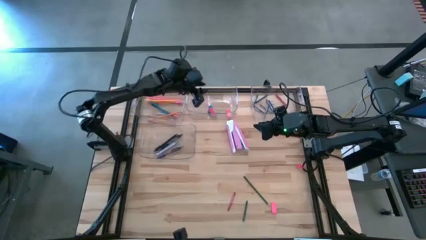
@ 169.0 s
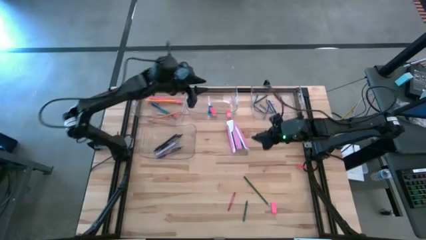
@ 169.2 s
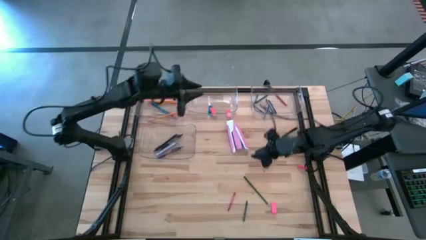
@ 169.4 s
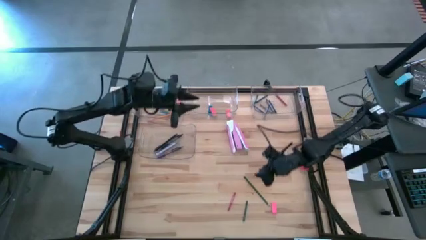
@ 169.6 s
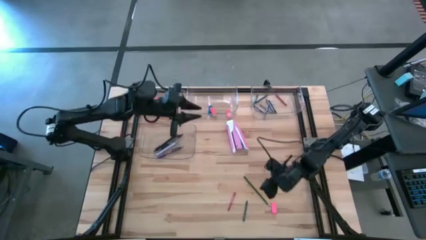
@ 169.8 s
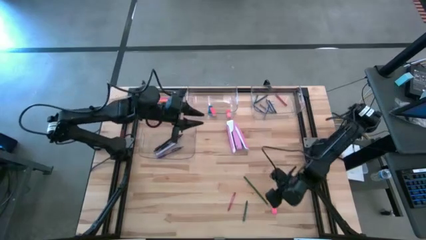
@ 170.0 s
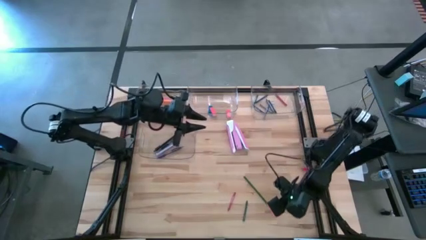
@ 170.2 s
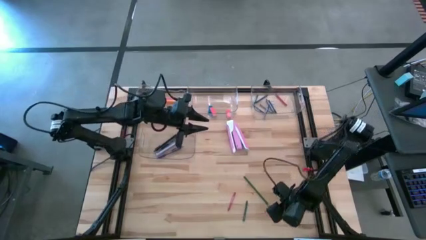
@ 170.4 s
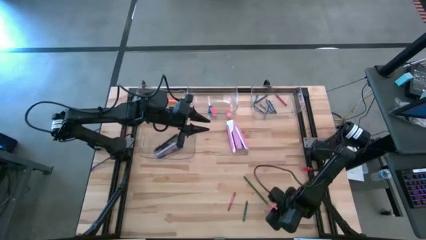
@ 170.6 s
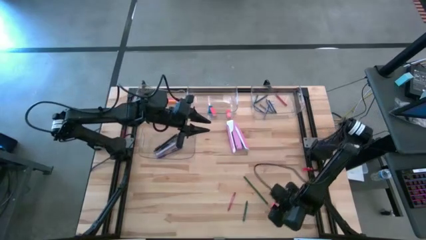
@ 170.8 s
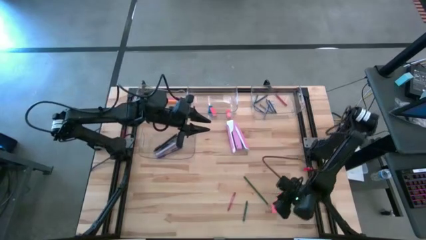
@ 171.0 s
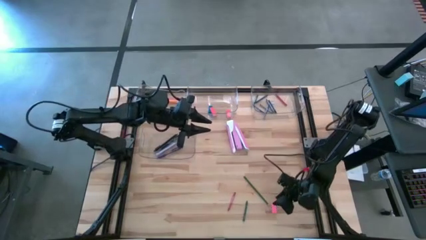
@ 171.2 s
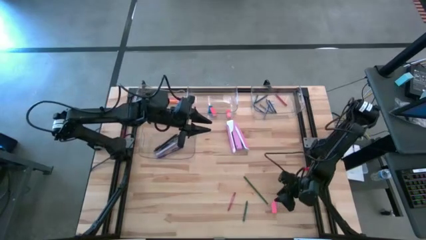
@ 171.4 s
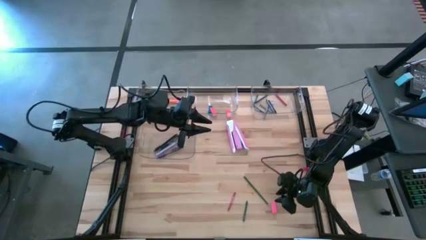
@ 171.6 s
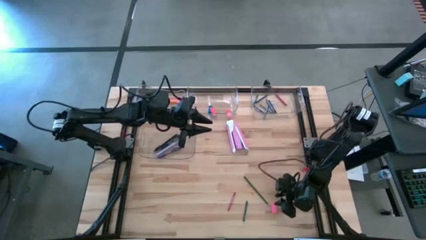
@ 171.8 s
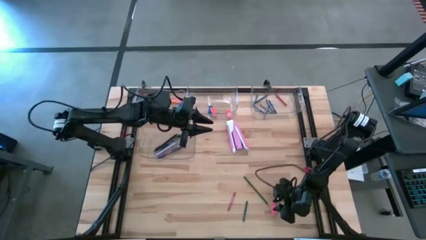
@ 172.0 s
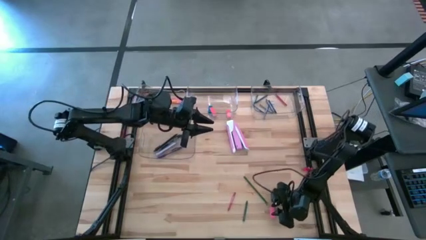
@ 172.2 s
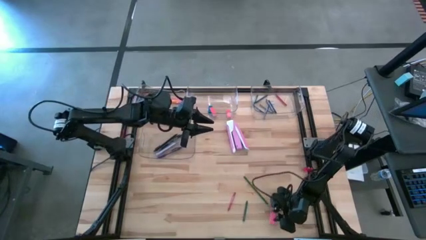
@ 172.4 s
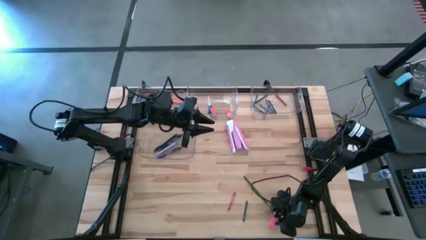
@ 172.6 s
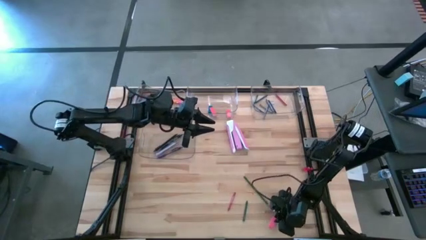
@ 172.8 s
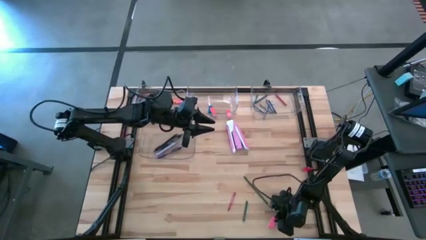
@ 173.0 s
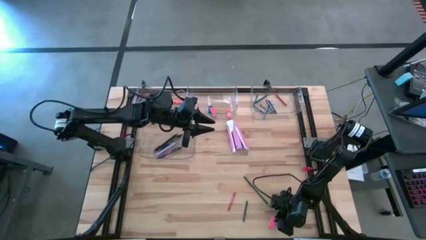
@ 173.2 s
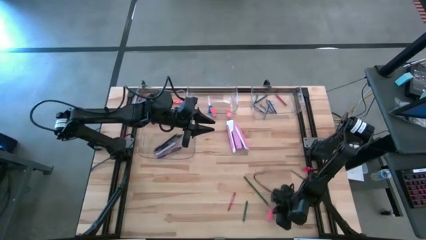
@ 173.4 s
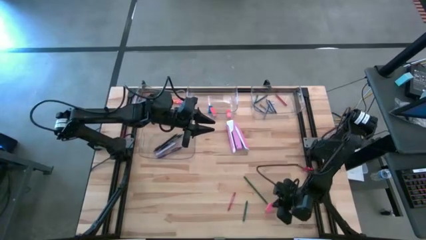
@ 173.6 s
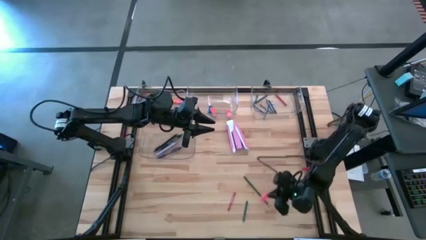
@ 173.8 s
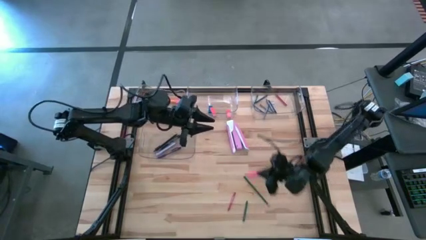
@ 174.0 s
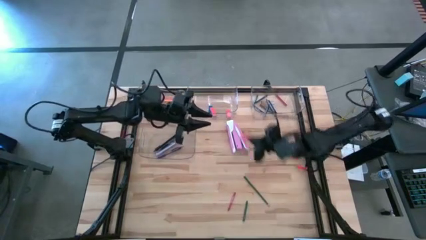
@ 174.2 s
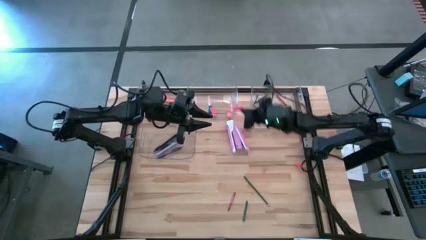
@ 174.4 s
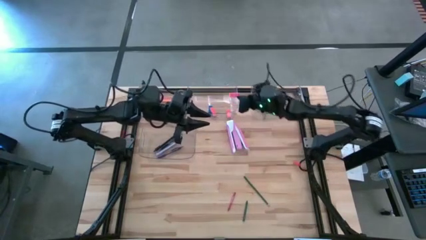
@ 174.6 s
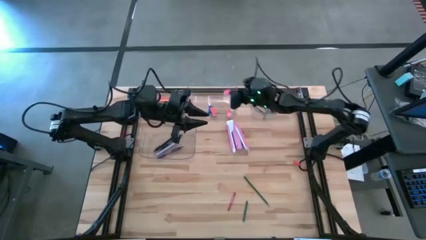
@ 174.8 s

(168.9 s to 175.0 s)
Task: Sort crayons/erasers/pens/pencils in bins
Put the pink eraser into the middle transparent bin

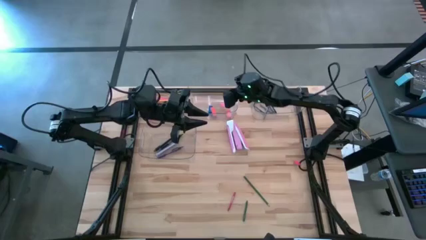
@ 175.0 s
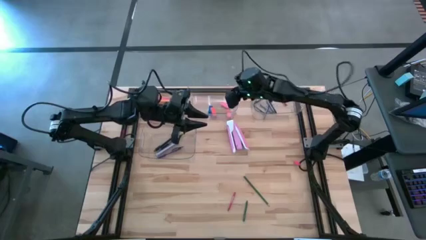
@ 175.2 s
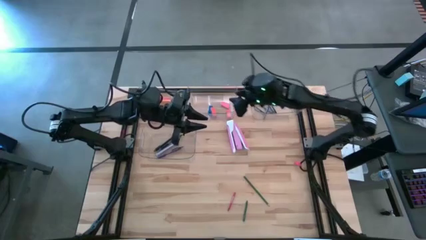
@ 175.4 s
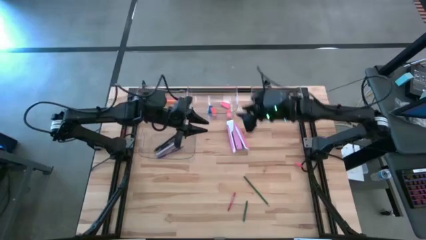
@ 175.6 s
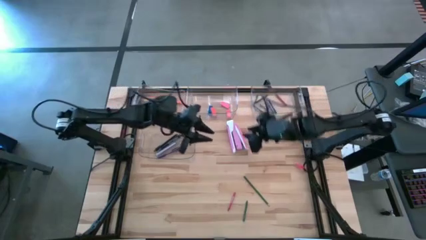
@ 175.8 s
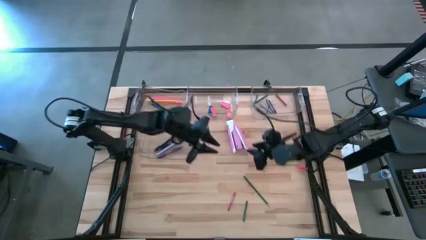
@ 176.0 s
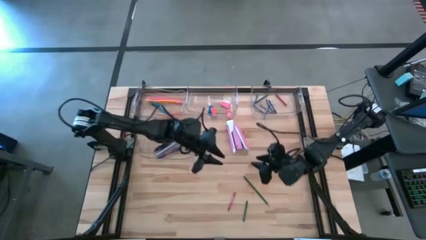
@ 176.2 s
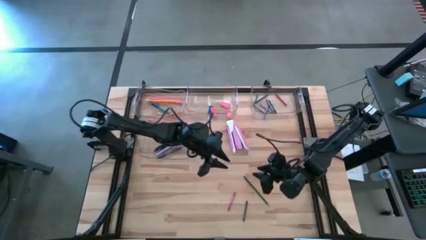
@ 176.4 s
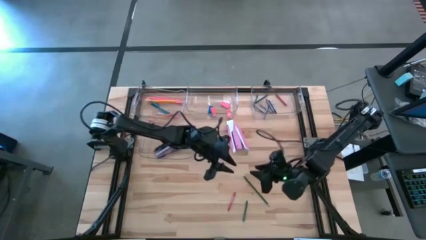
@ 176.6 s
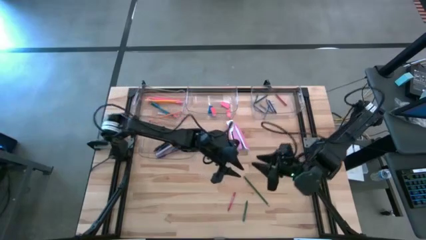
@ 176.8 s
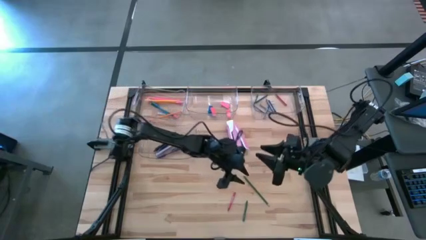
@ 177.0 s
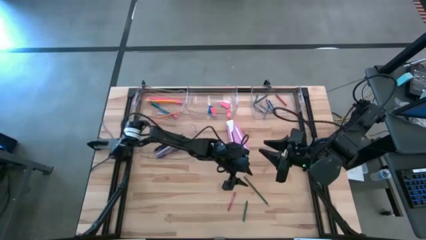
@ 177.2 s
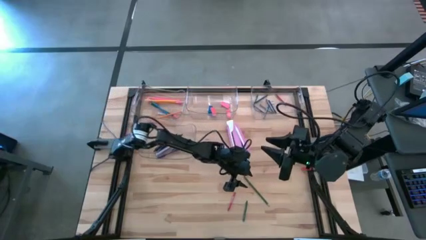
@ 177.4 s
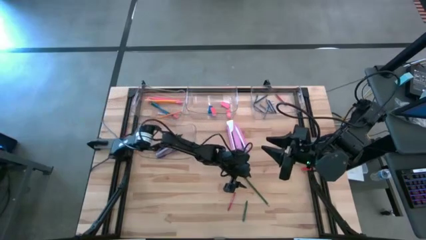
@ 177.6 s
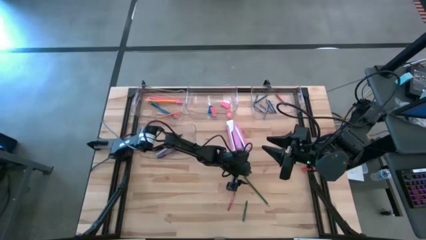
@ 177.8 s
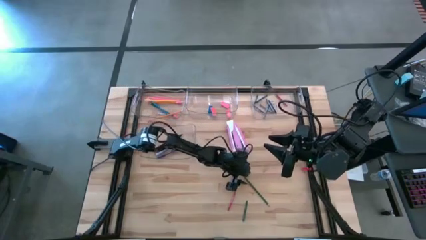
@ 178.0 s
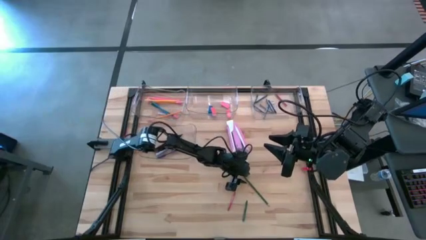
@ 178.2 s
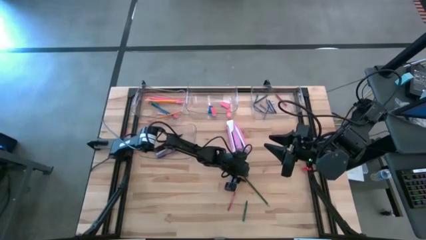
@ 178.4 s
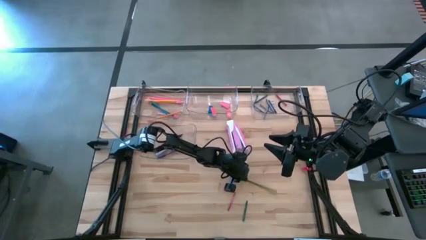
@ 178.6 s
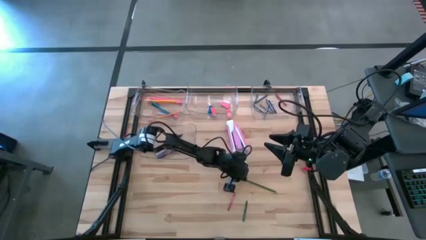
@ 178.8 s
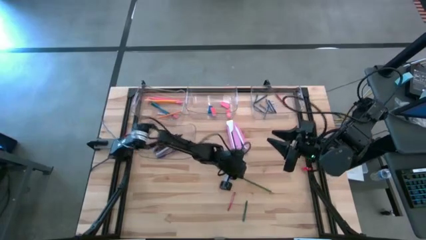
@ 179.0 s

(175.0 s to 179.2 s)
Put the green pencil into the top left transparent bin

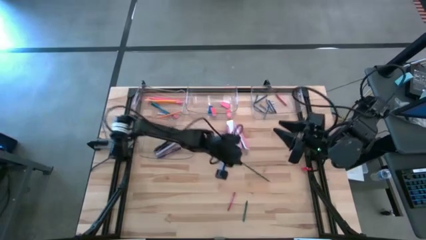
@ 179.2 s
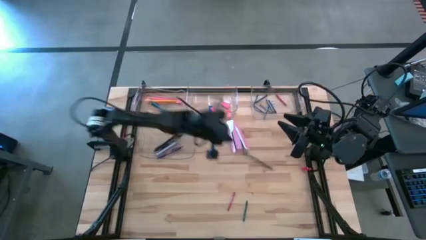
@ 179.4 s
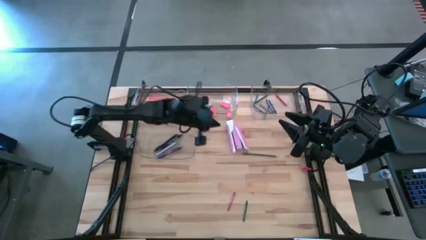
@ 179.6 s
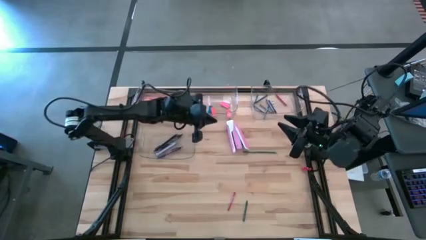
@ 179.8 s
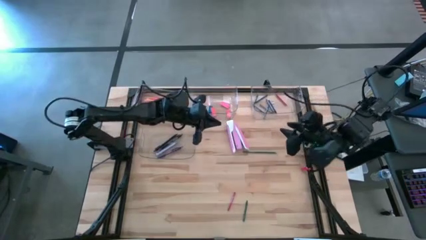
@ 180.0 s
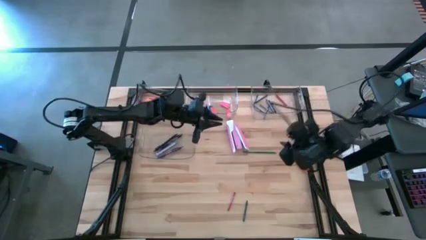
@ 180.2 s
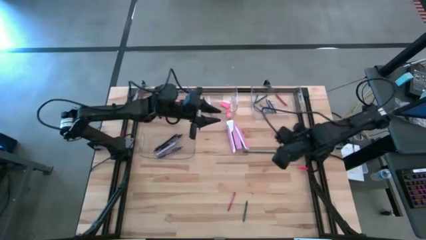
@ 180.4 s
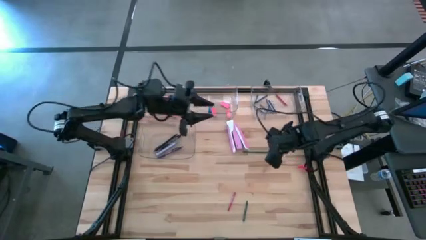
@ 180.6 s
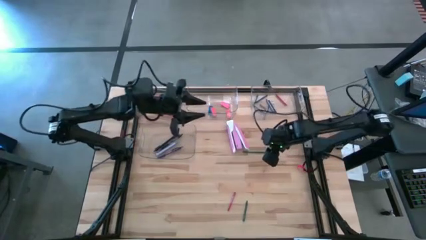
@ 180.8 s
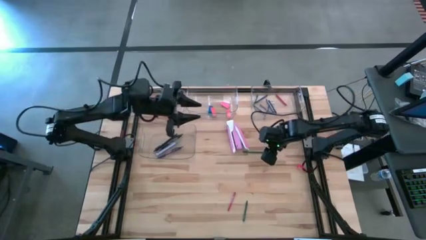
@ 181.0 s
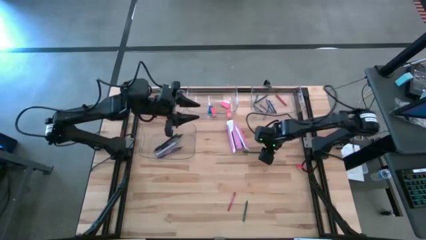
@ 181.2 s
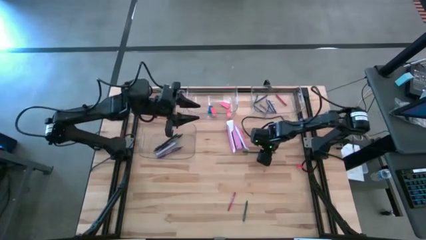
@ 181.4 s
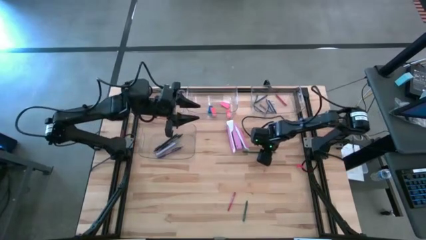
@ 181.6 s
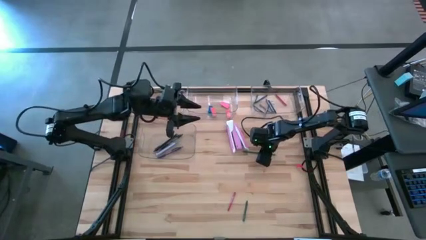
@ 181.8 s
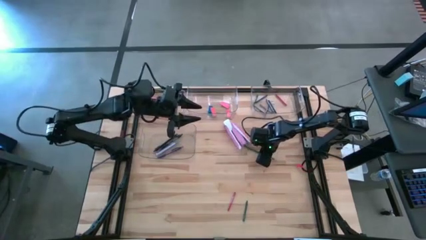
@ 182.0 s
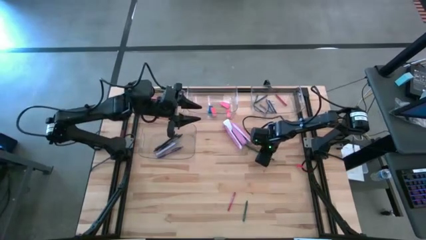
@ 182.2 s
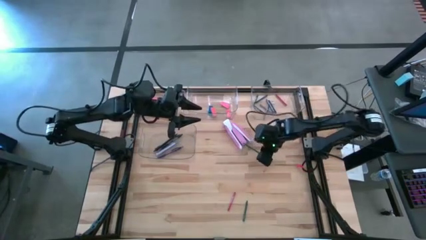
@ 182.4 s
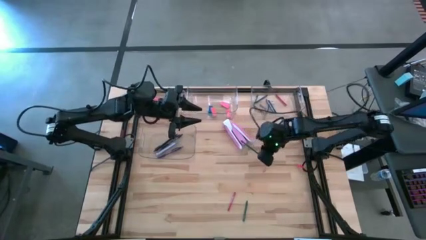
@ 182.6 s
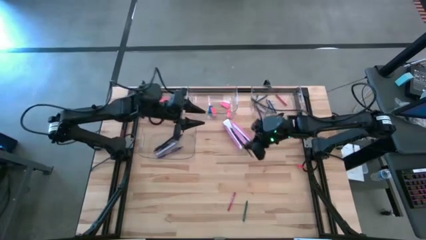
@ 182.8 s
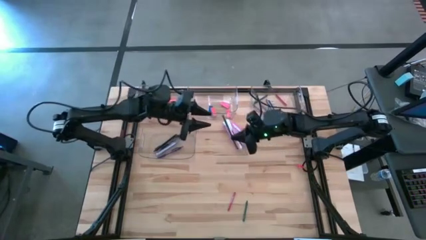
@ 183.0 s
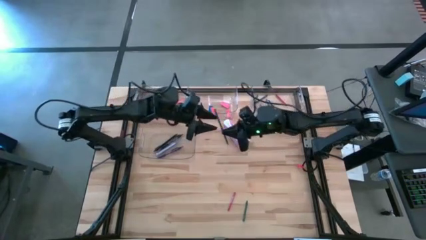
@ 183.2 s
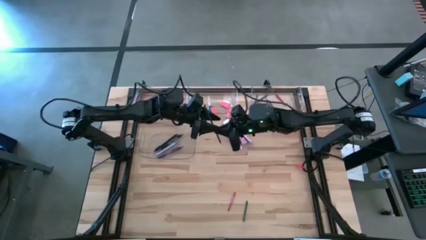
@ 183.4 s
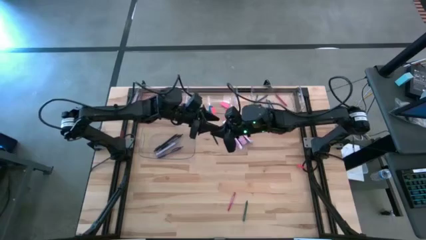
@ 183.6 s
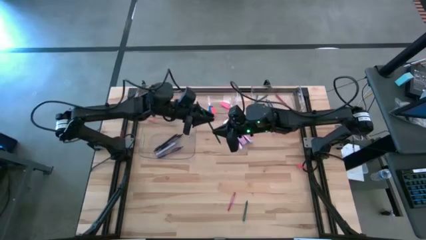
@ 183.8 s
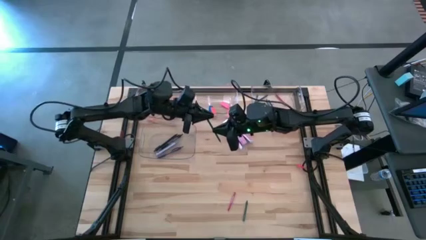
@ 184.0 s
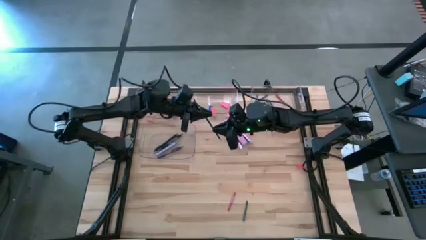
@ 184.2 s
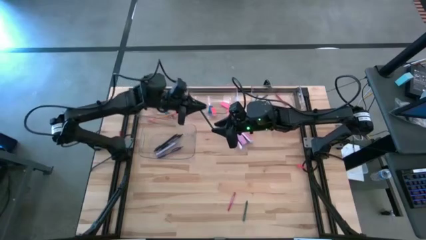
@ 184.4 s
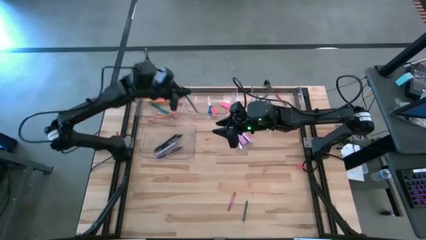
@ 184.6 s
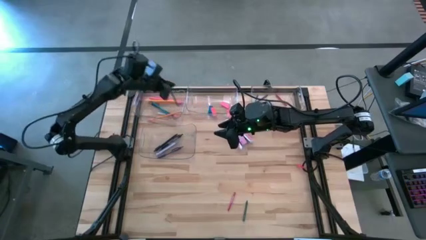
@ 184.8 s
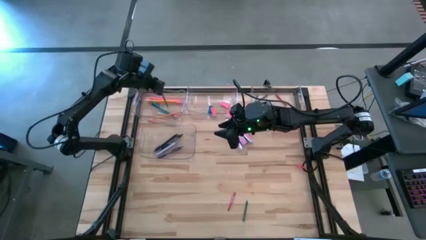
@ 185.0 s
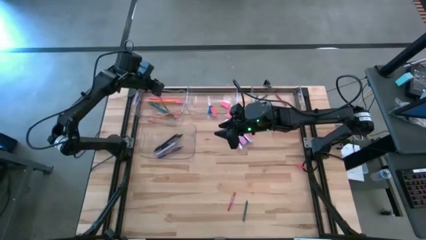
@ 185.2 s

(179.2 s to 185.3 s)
Put the green pencil into the top left transparent bin
